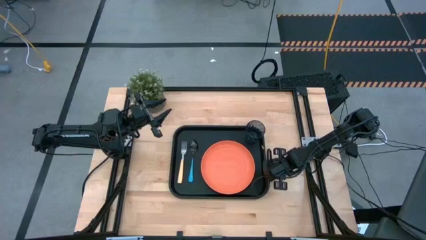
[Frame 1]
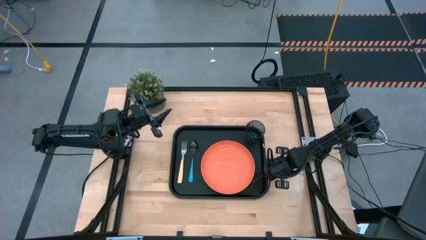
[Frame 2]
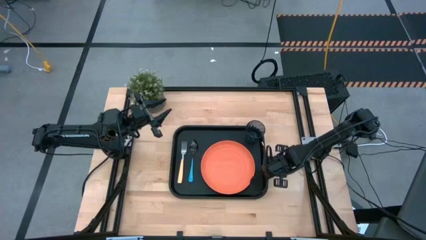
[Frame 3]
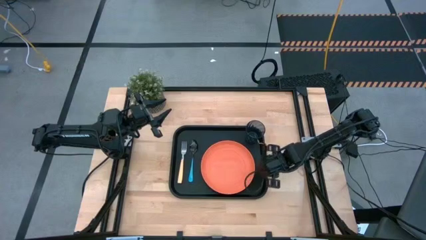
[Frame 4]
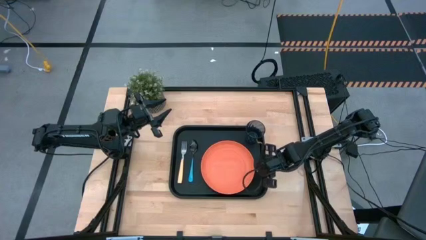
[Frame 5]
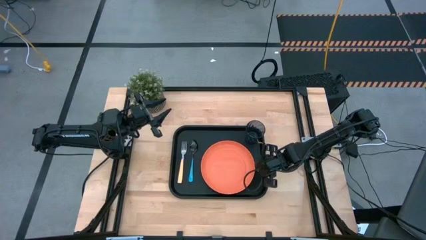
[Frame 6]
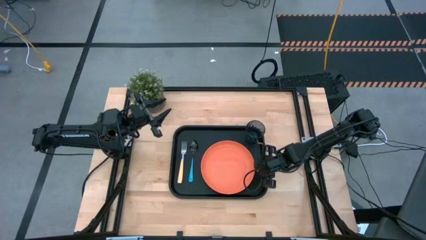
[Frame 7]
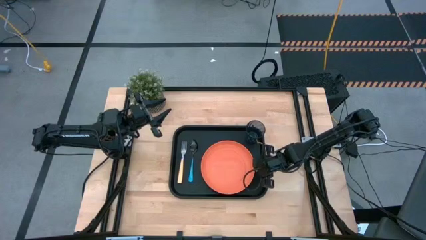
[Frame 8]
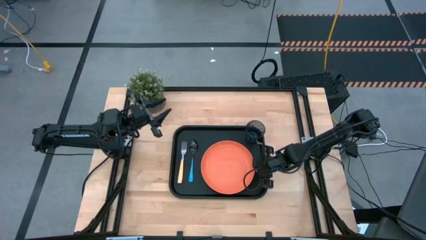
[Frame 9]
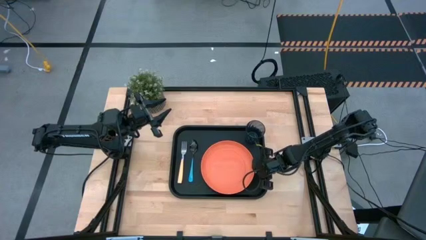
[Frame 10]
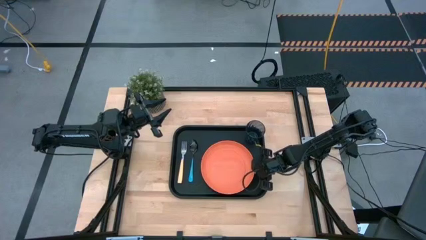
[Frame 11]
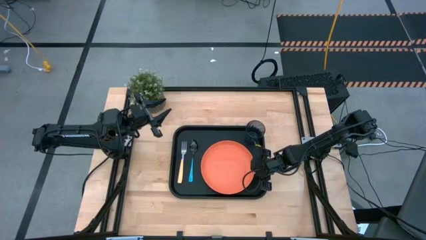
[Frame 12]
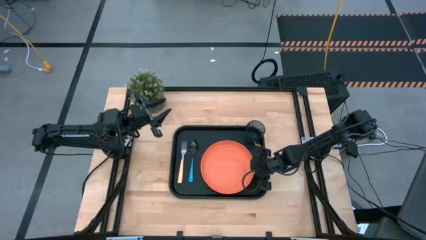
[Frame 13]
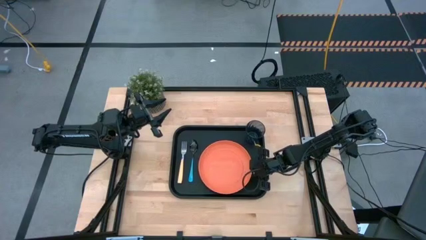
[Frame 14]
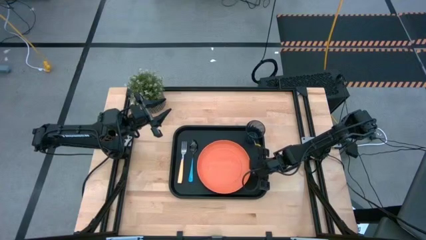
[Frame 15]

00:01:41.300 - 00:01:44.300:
Task: Pick and place plate/cup/fork/spoon on tray
Adjust the orange plate

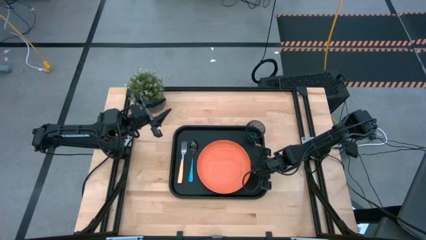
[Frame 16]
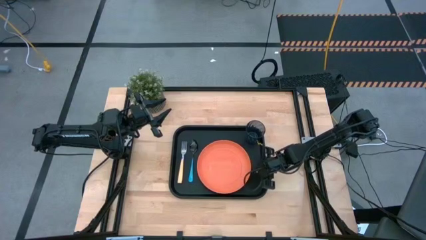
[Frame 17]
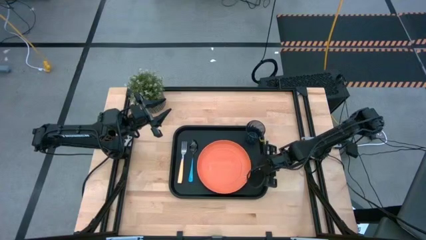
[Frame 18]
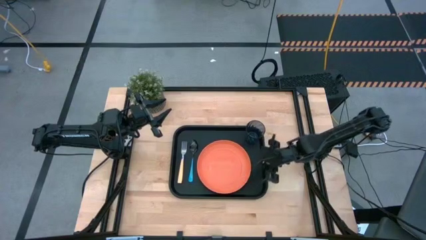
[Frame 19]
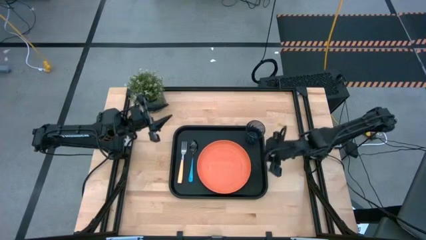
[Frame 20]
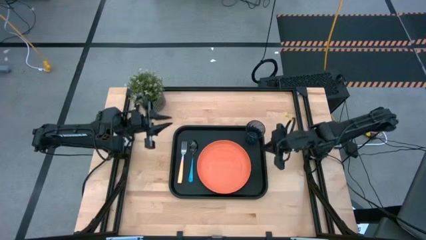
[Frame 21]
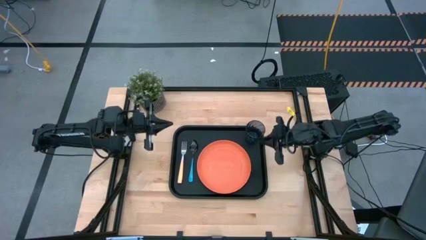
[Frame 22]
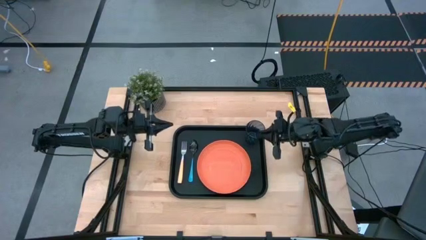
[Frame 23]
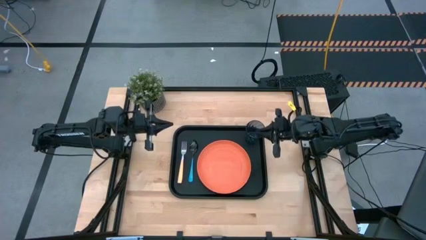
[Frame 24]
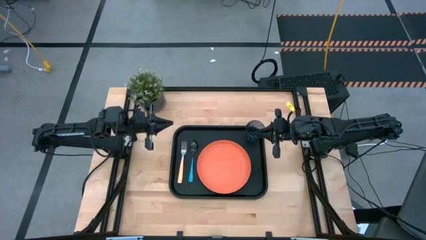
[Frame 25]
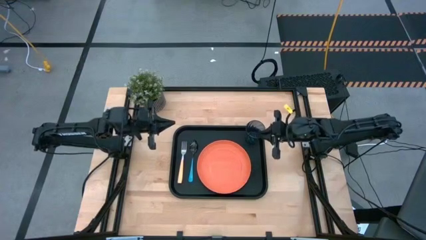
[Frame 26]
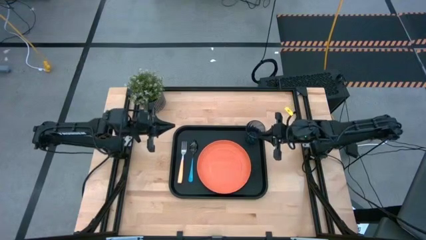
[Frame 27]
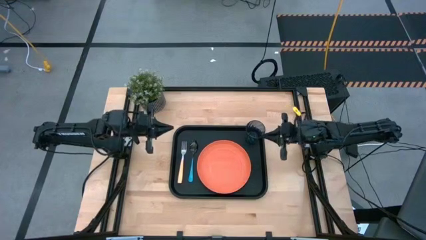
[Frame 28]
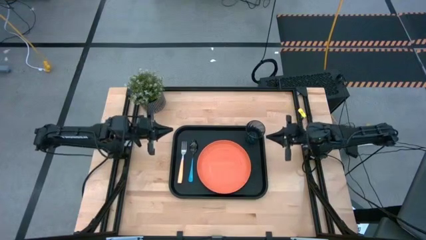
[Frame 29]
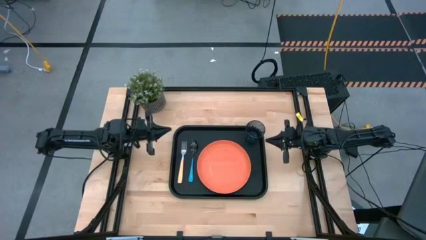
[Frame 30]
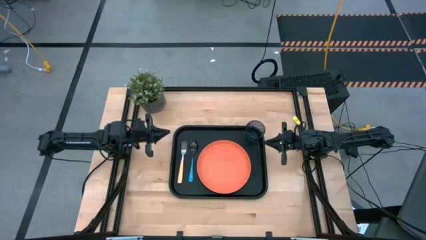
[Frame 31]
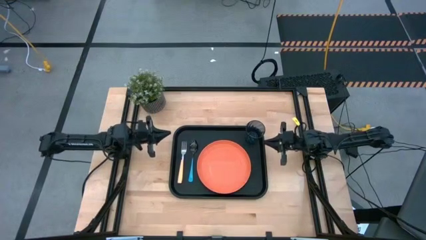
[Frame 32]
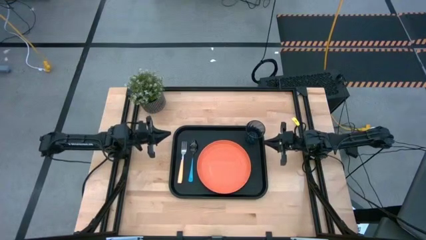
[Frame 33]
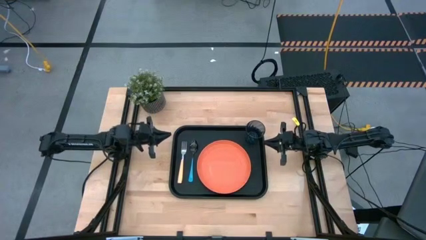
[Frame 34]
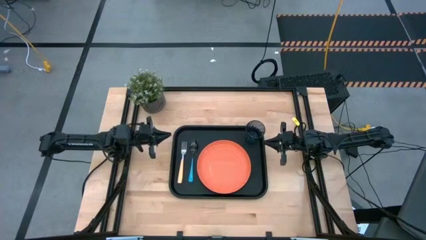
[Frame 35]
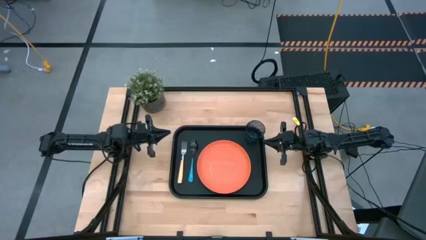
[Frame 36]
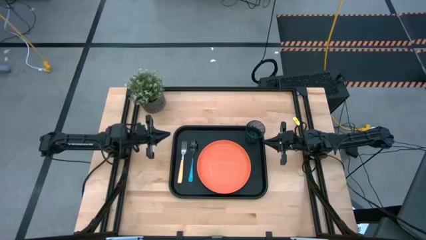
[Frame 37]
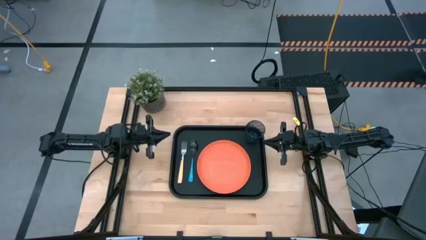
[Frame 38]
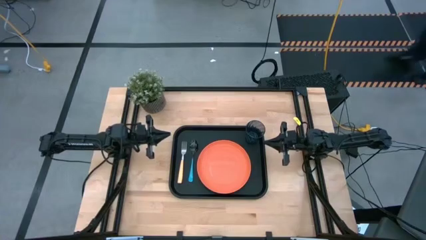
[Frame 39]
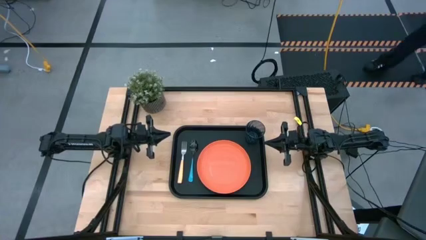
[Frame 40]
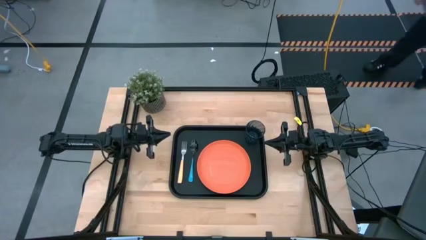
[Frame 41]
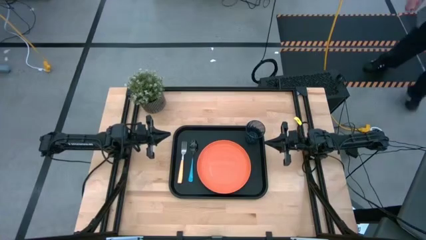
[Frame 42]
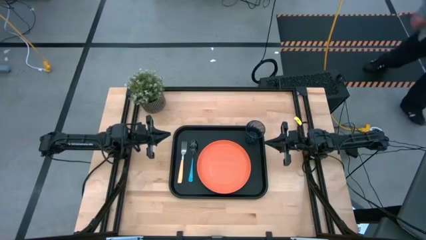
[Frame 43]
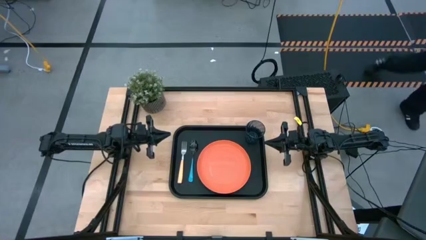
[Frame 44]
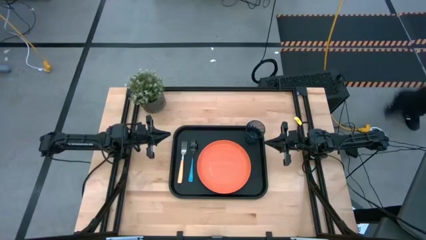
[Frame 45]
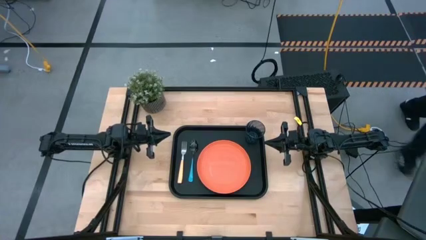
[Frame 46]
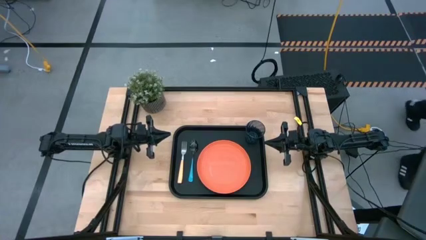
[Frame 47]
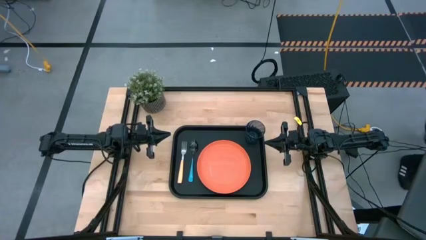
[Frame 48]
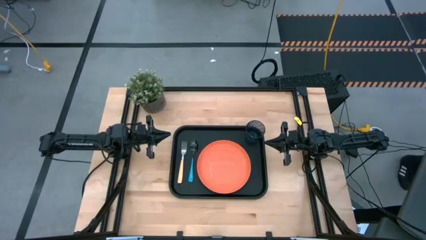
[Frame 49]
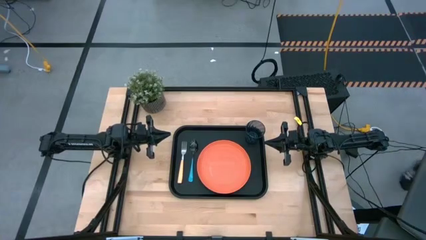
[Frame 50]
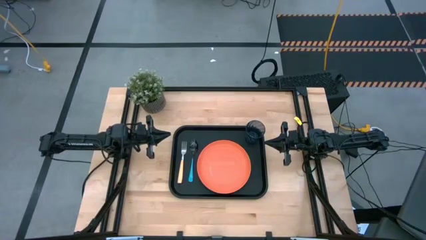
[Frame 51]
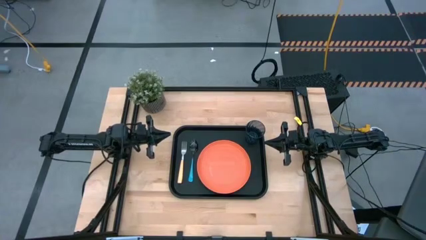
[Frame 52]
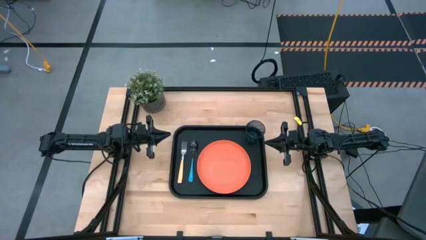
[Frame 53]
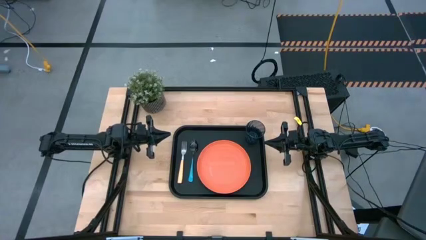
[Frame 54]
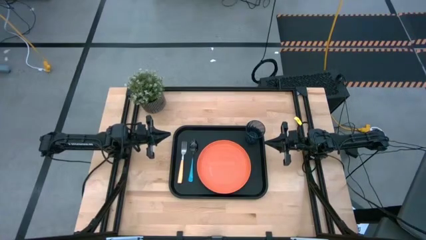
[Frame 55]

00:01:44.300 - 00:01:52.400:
Return to Home Position

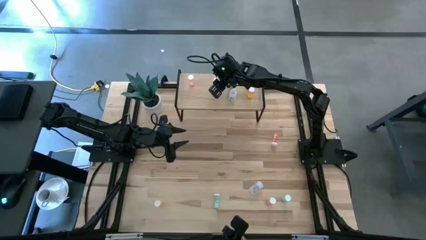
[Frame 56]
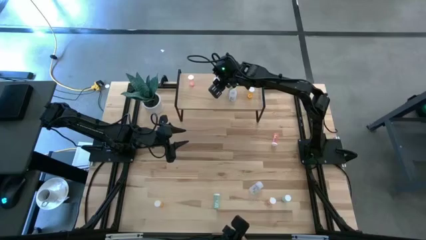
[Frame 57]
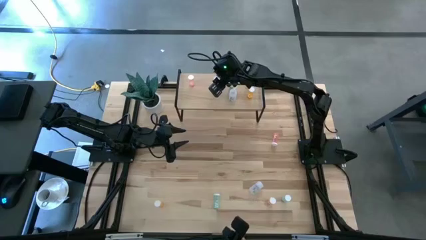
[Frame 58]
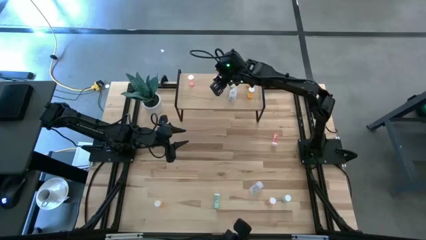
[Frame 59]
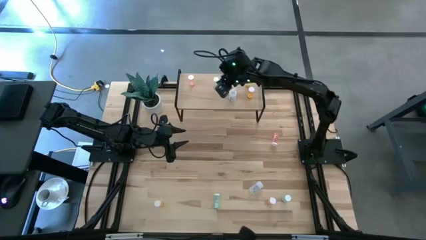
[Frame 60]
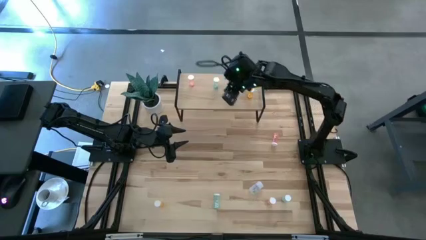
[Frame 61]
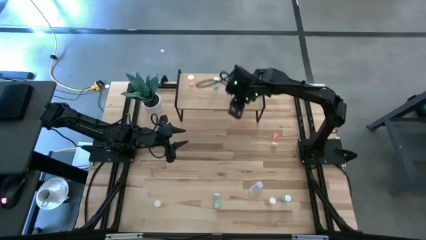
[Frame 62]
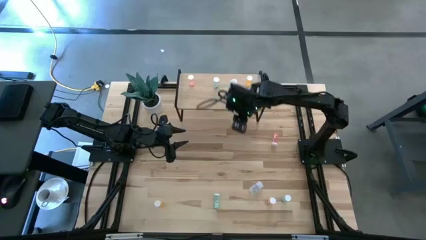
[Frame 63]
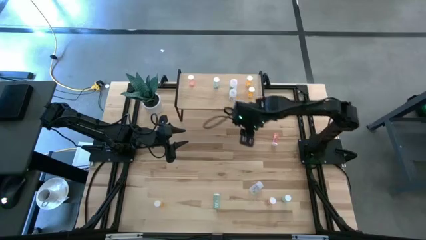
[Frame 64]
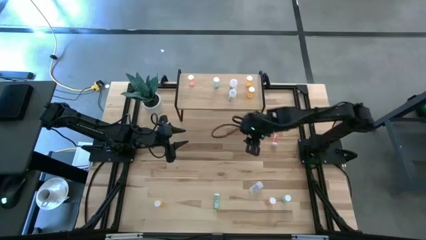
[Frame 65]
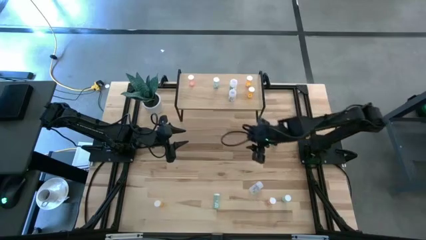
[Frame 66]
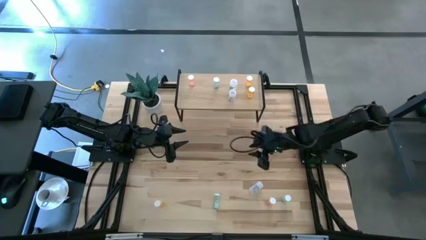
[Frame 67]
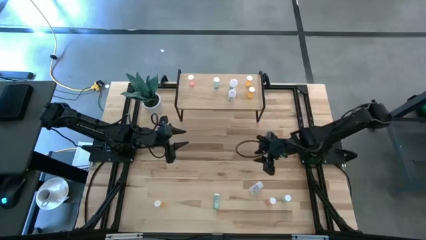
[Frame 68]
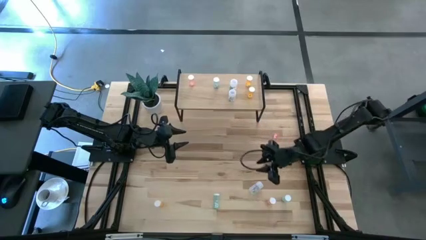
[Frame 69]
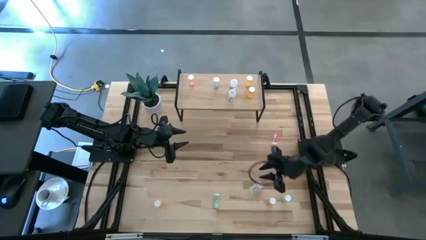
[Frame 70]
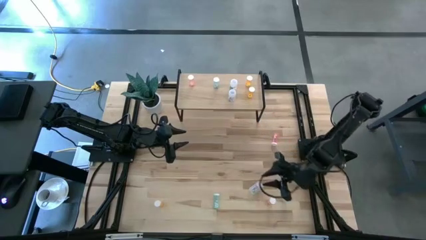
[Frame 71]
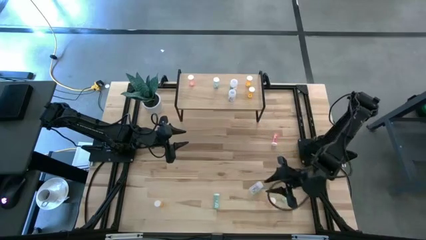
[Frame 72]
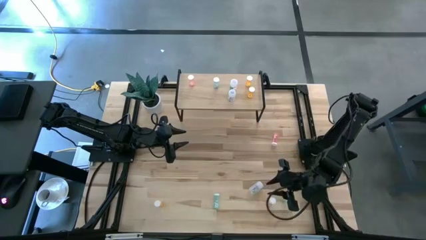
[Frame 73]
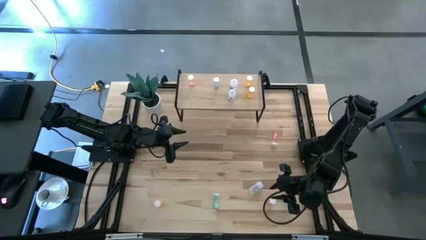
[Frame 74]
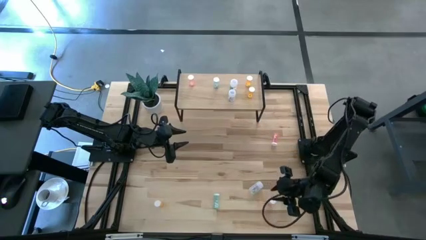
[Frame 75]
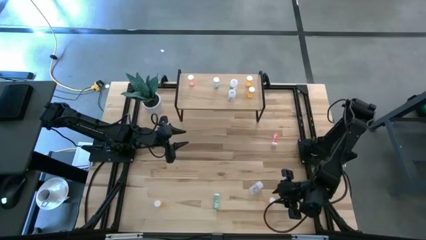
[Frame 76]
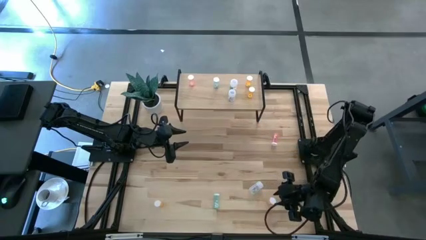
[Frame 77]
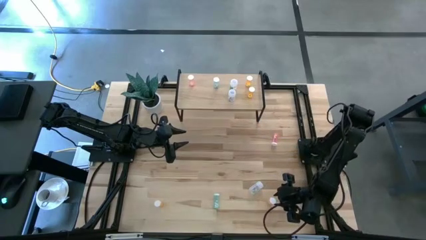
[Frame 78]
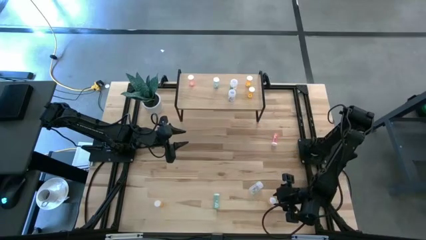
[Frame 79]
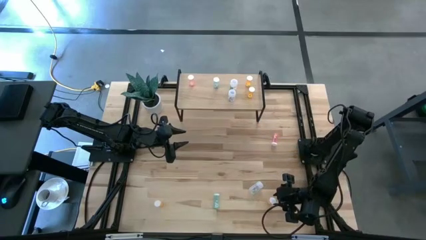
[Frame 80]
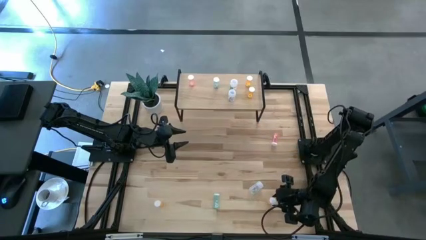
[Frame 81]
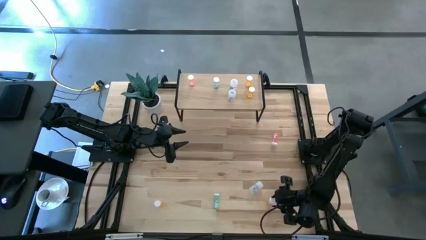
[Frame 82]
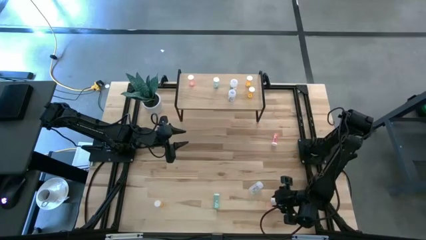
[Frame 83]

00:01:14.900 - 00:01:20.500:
Task: Pick and place medicine bottles onto shelf by color
Put the bottom pink pill bottle aligned with the other pink pill bottle on the shelf
